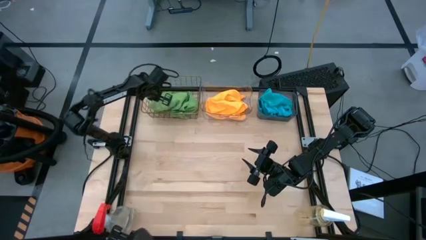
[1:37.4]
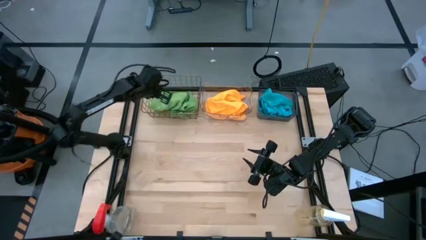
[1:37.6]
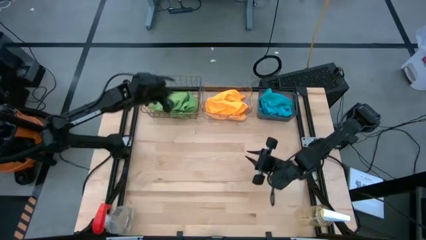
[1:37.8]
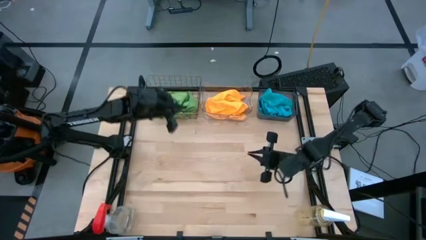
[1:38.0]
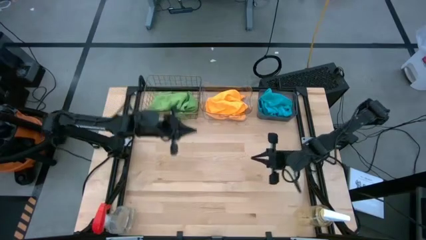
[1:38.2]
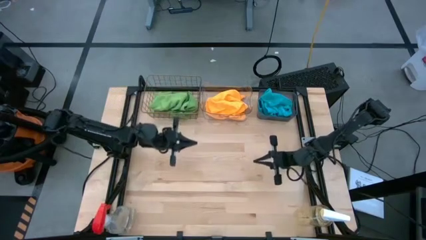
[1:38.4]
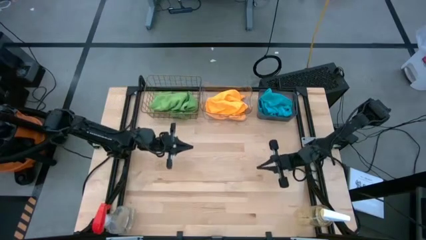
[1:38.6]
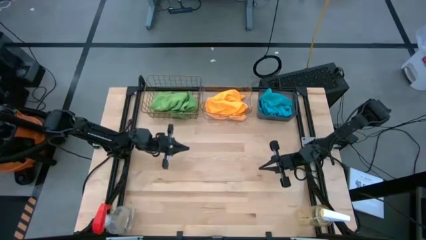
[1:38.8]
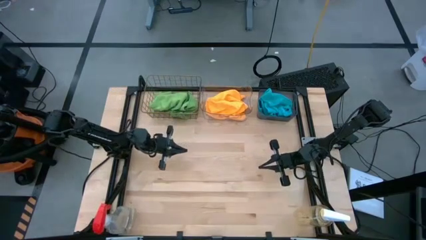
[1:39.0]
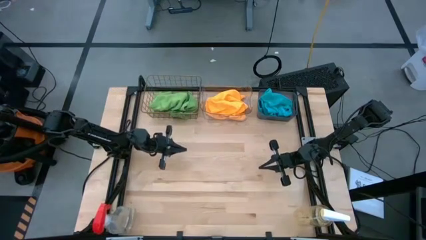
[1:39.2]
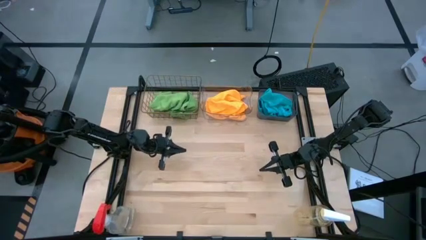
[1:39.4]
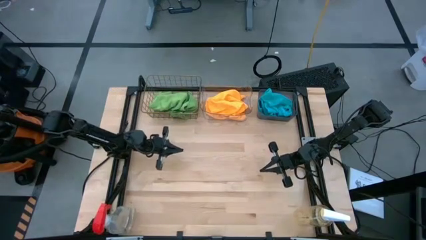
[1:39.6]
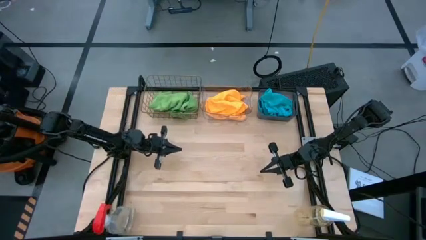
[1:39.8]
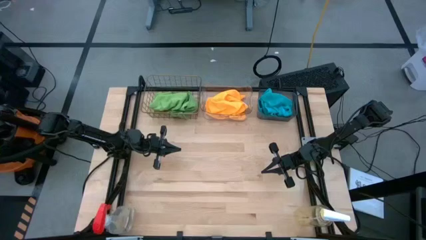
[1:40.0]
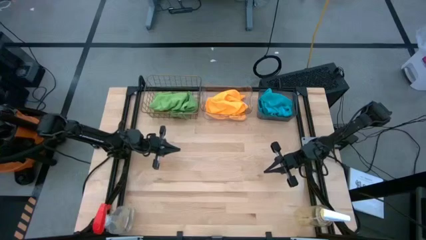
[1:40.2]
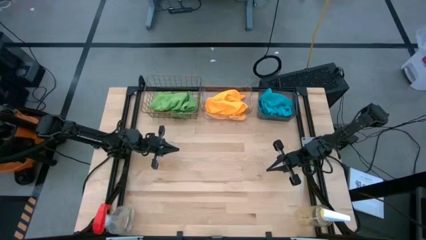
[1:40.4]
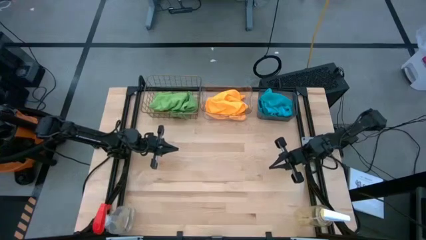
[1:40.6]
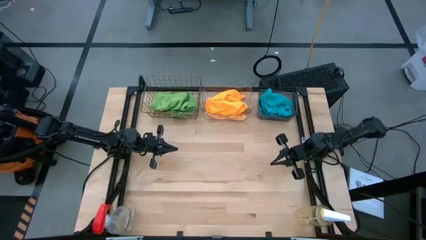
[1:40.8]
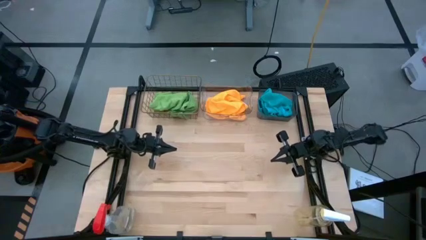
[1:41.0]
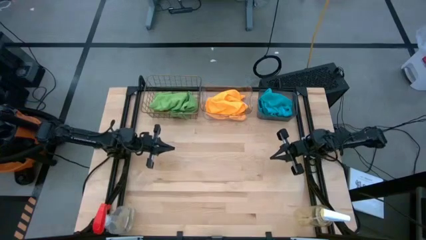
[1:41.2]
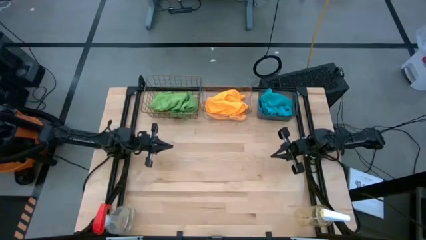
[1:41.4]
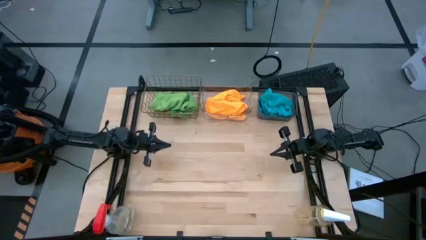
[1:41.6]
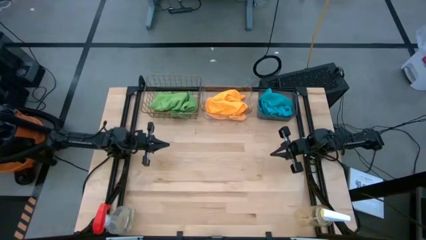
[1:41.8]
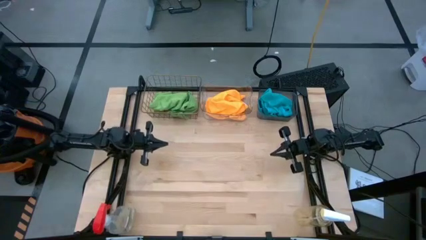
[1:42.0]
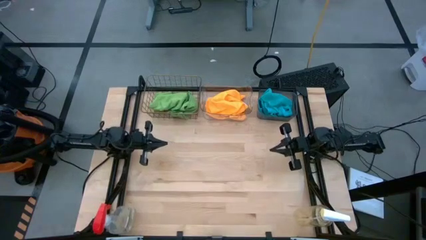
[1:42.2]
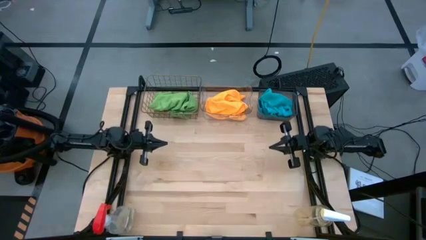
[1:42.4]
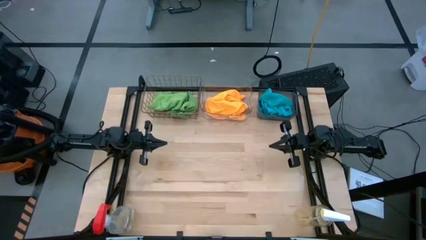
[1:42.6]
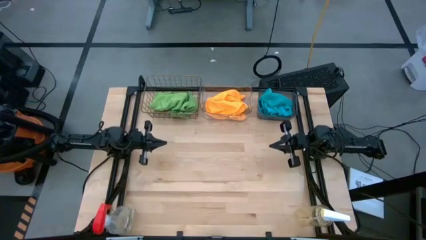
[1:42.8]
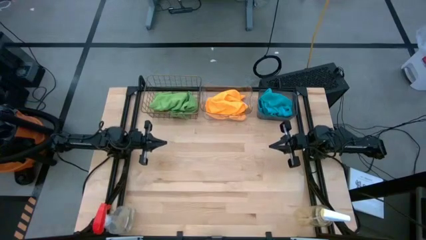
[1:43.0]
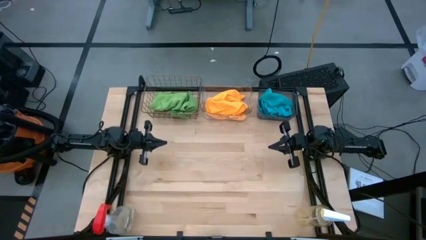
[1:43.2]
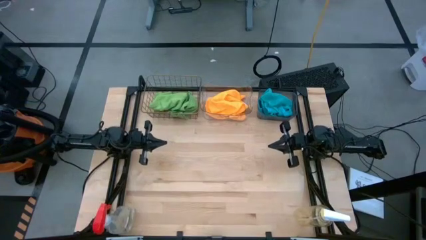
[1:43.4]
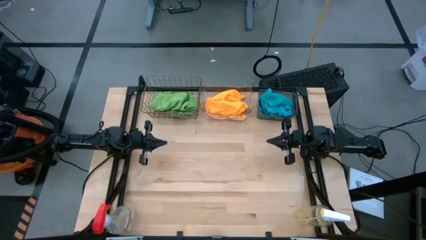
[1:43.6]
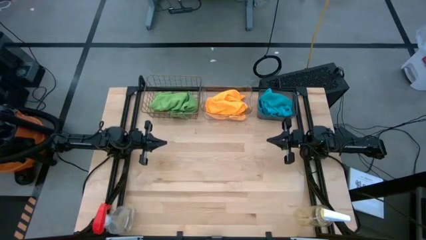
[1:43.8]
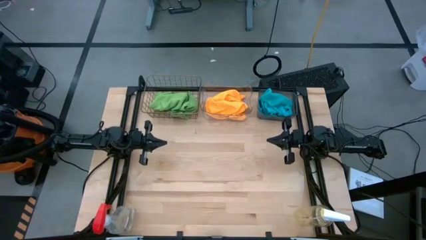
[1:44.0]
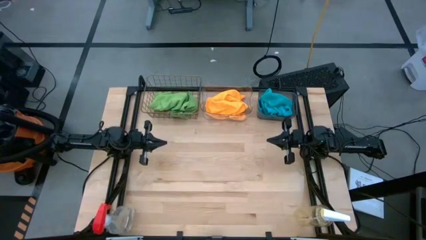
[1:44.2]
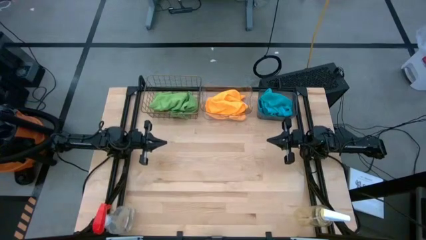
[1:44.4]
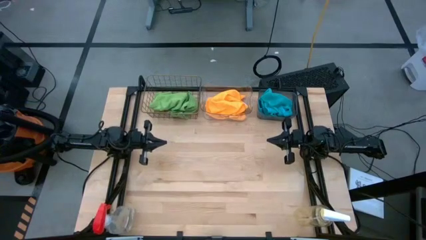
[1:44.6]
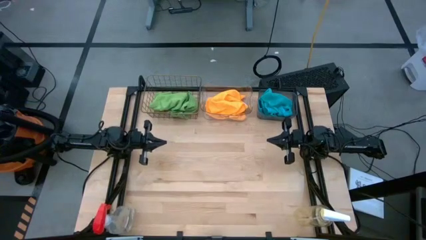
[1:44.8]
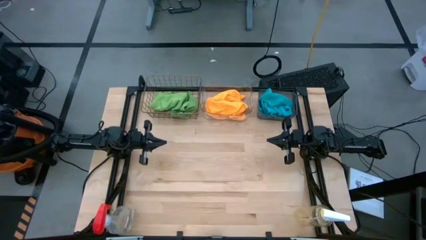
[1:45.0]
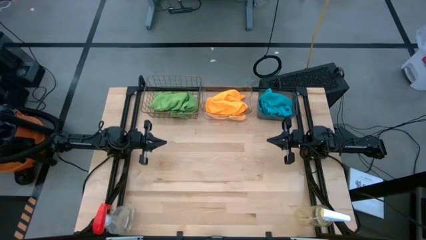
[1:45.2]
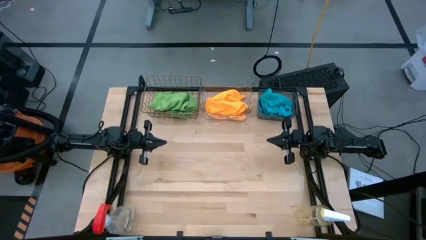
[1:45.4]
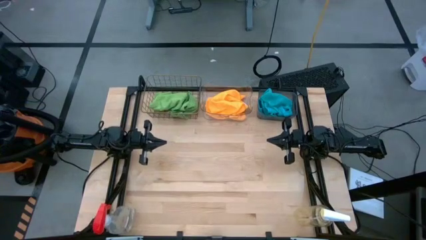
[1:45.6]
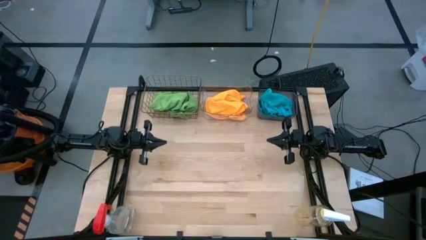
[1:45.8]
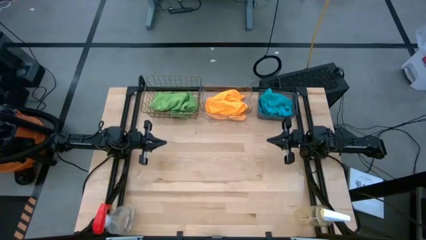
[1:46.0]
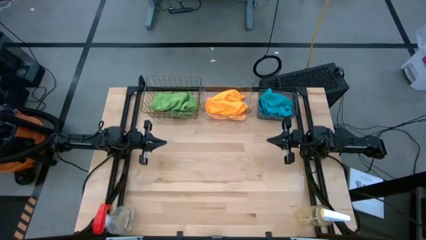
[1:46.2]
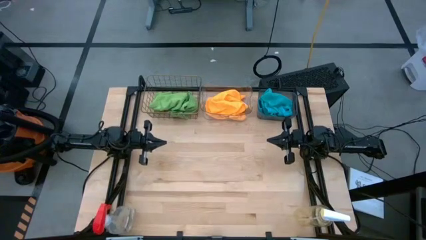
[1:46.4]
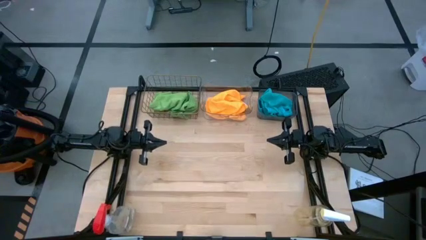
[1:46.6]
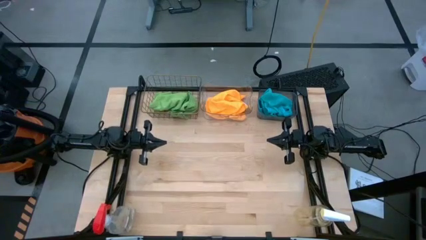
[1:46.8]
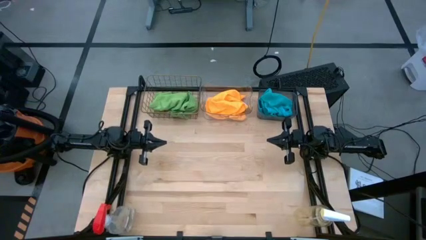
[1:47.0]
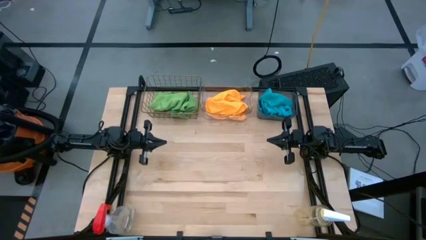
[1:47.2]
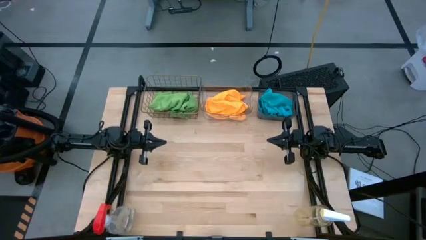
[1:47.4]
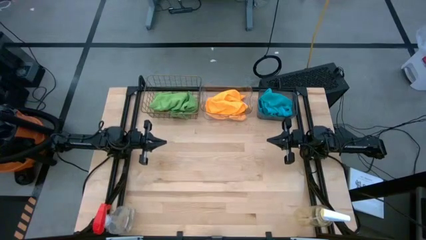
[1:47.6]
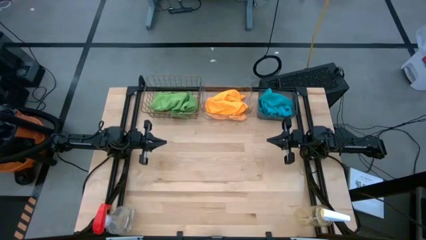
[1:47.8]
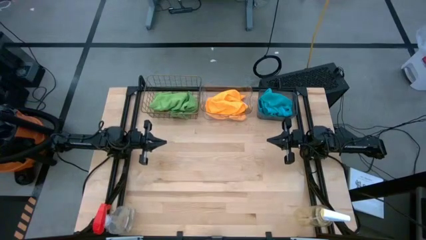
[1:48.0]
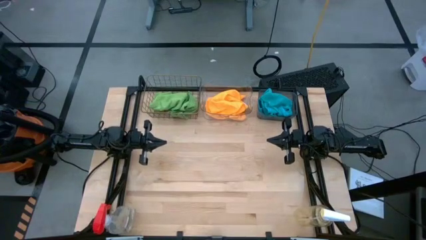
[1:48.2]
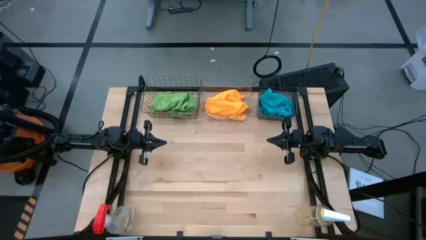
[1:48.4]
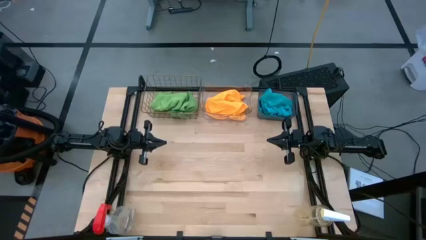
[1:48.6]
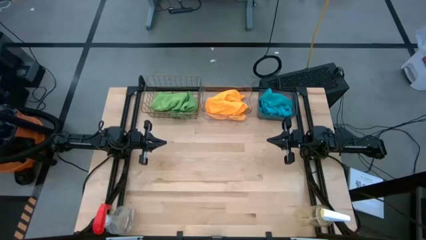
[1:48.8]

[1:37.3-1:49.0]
Task: Sort microfiber towel by color & place in baskets
Return to Home Position
